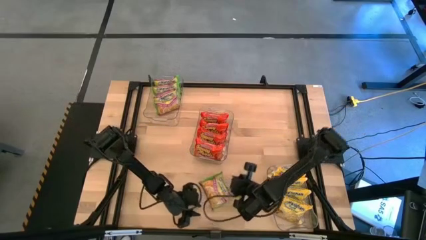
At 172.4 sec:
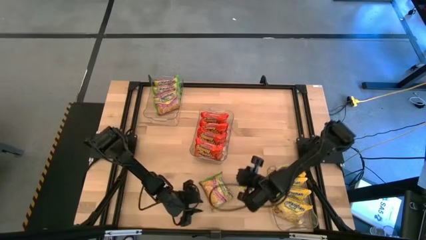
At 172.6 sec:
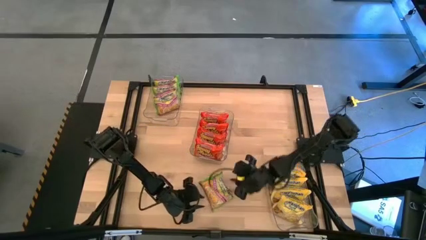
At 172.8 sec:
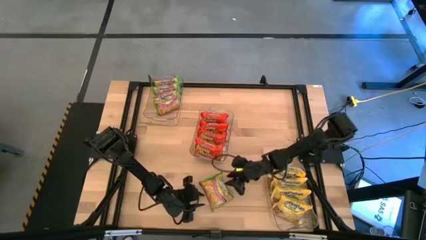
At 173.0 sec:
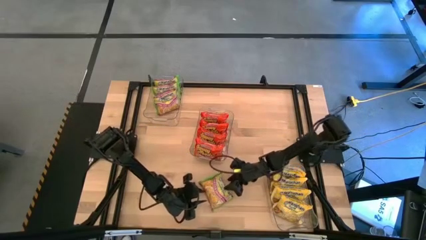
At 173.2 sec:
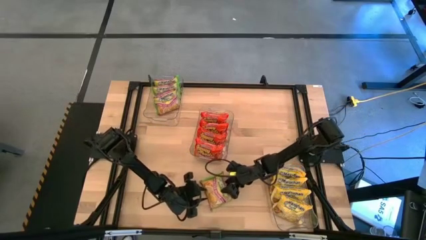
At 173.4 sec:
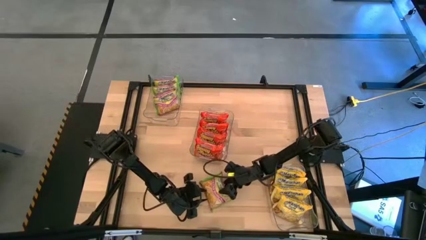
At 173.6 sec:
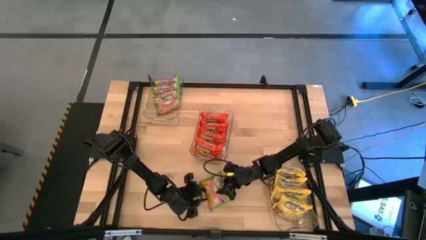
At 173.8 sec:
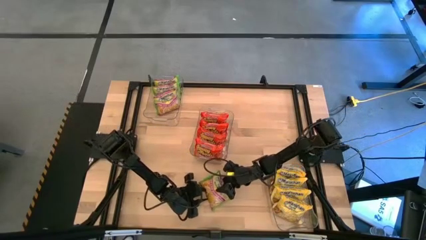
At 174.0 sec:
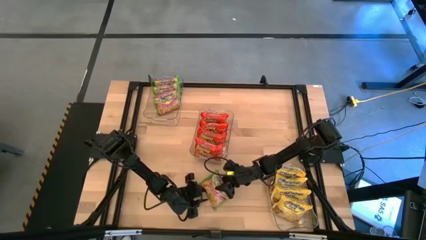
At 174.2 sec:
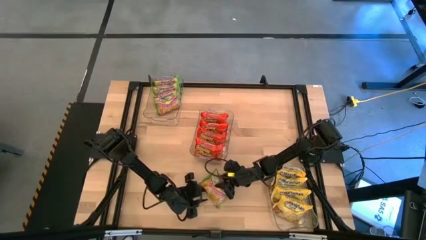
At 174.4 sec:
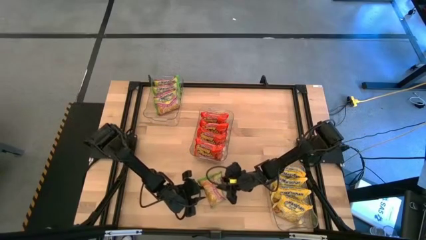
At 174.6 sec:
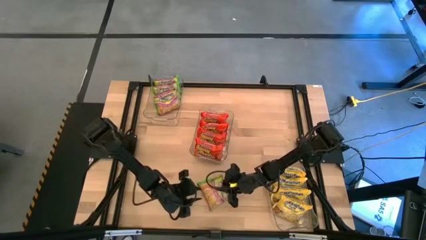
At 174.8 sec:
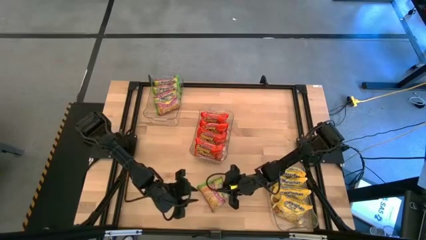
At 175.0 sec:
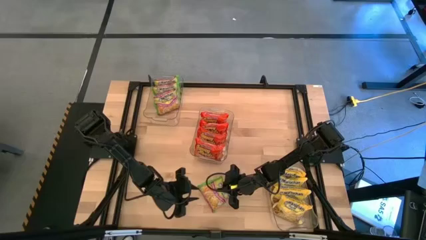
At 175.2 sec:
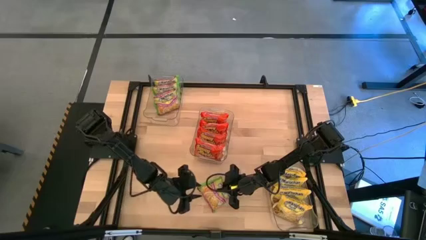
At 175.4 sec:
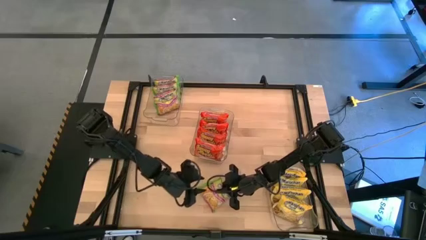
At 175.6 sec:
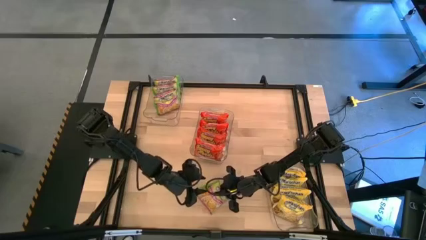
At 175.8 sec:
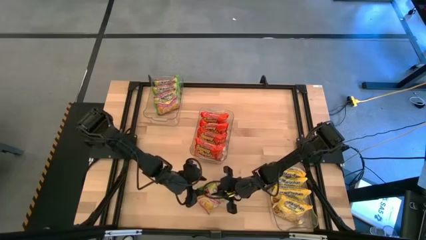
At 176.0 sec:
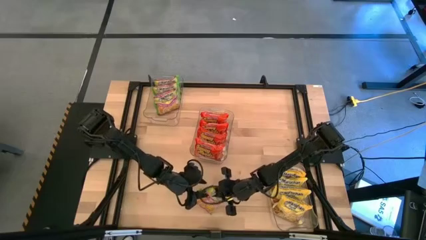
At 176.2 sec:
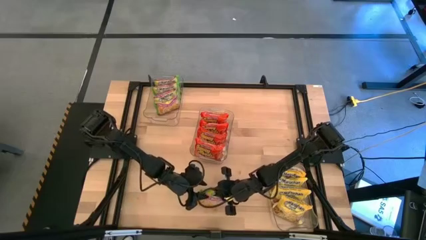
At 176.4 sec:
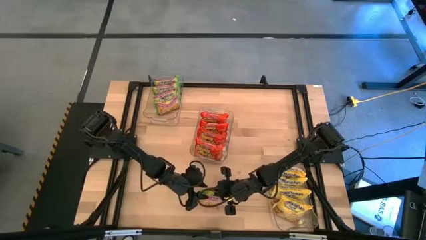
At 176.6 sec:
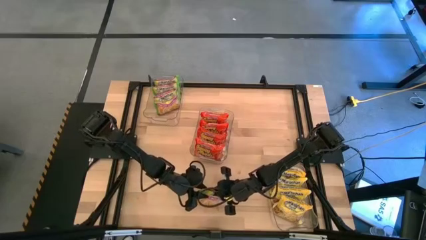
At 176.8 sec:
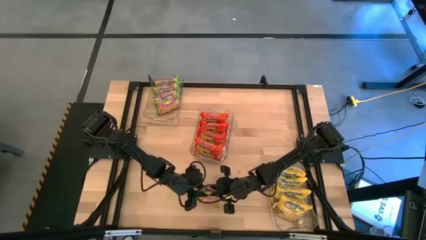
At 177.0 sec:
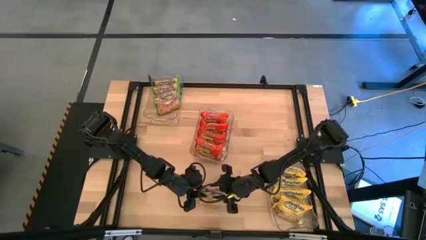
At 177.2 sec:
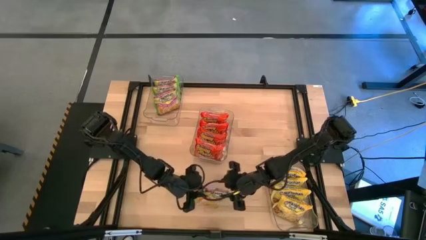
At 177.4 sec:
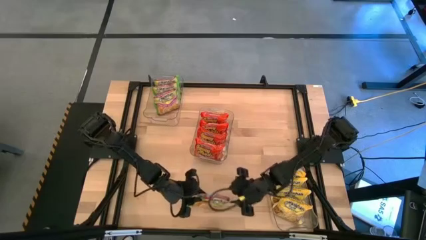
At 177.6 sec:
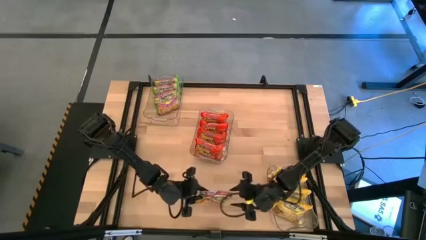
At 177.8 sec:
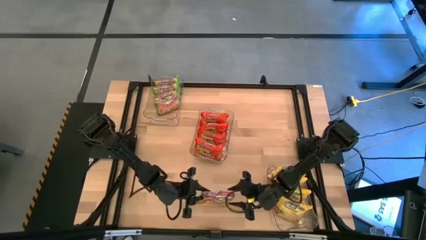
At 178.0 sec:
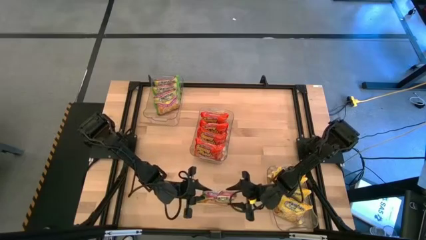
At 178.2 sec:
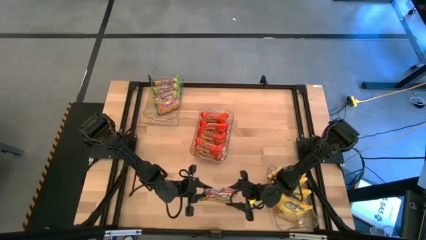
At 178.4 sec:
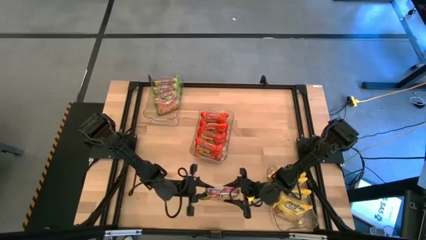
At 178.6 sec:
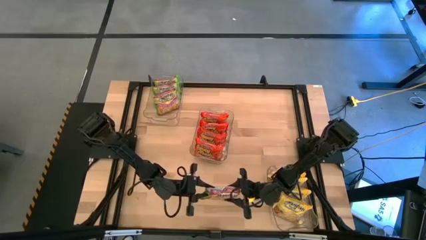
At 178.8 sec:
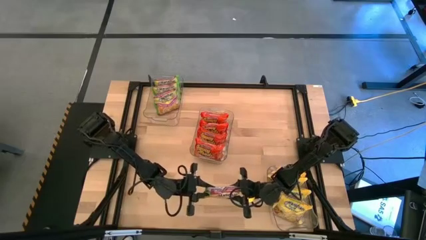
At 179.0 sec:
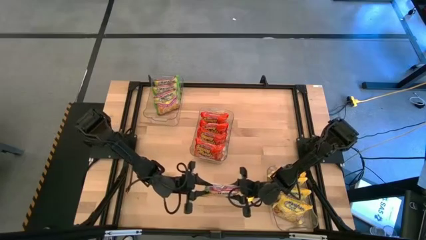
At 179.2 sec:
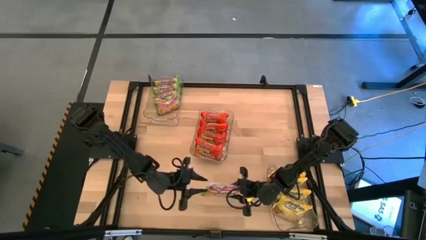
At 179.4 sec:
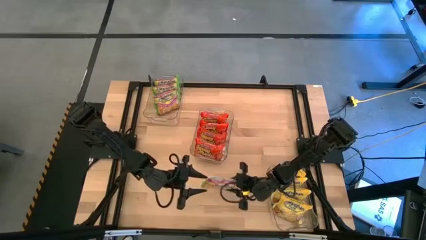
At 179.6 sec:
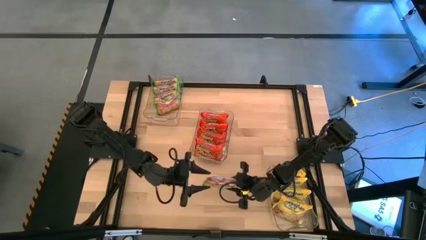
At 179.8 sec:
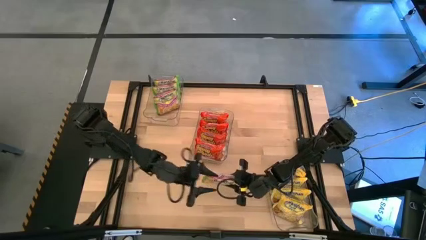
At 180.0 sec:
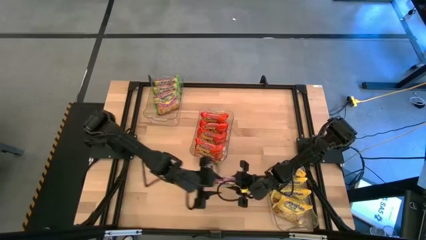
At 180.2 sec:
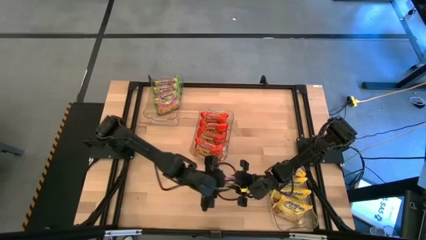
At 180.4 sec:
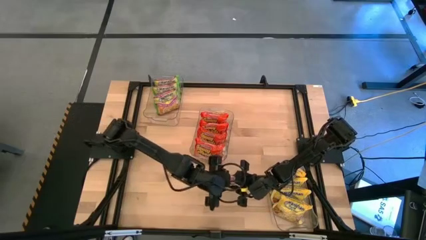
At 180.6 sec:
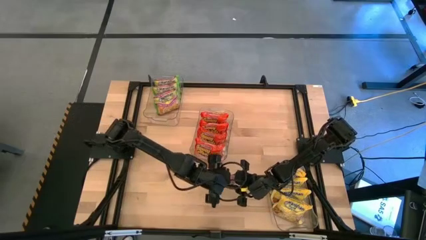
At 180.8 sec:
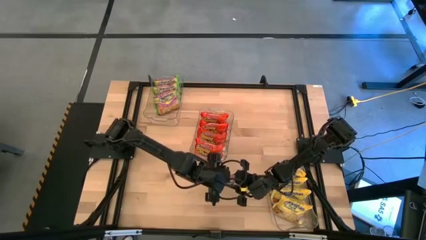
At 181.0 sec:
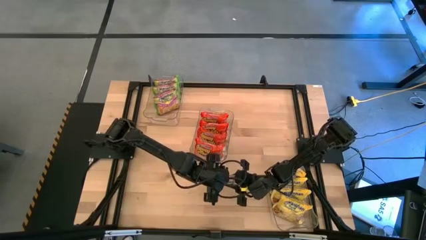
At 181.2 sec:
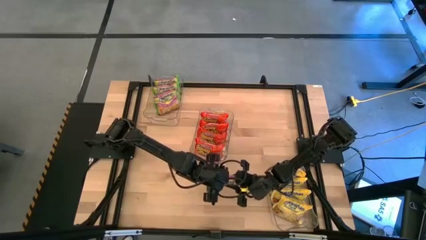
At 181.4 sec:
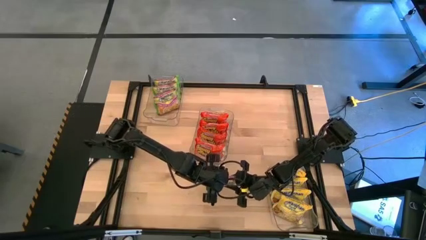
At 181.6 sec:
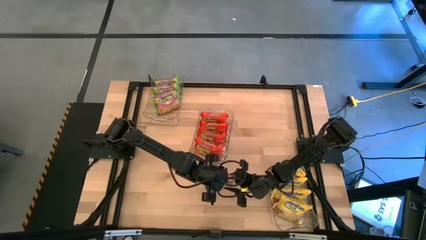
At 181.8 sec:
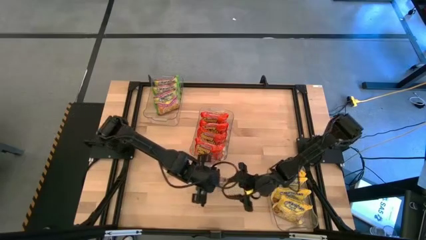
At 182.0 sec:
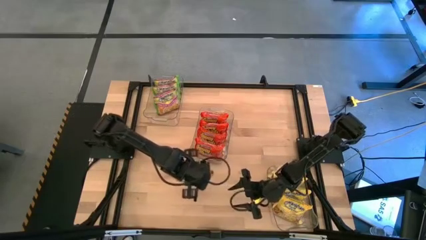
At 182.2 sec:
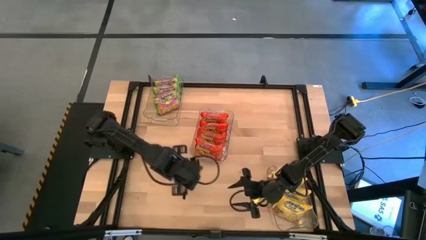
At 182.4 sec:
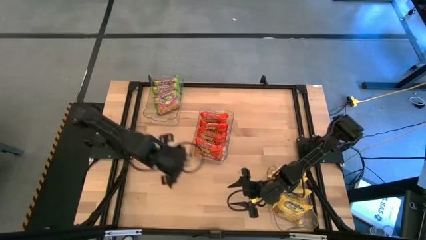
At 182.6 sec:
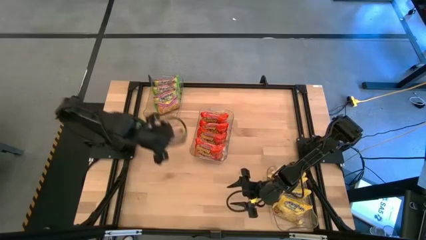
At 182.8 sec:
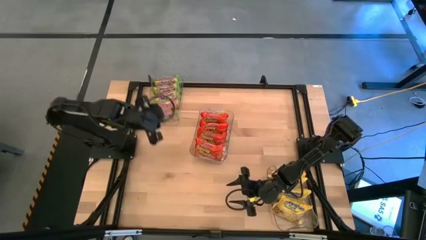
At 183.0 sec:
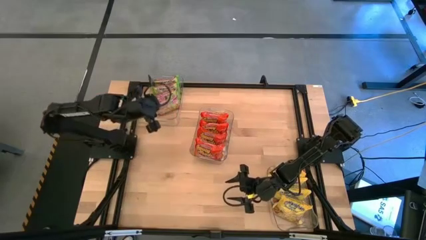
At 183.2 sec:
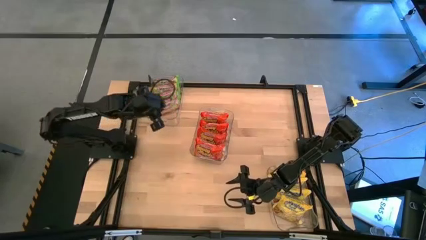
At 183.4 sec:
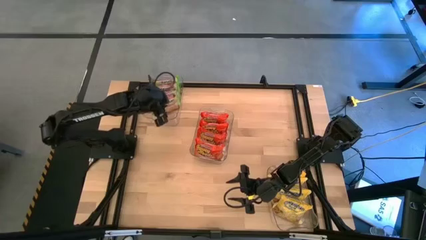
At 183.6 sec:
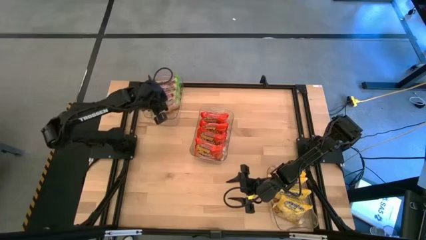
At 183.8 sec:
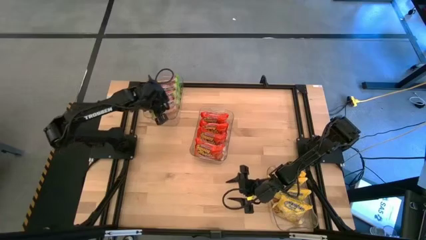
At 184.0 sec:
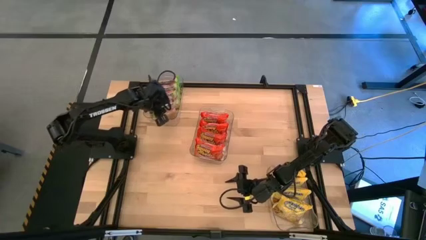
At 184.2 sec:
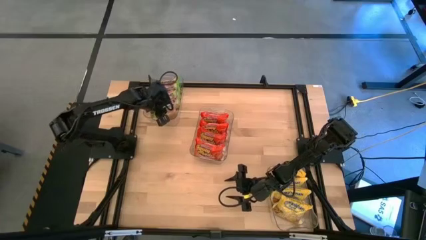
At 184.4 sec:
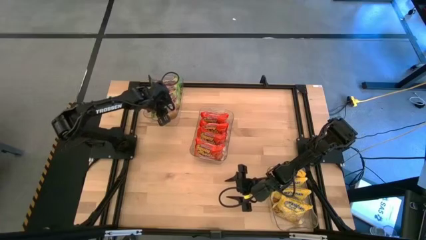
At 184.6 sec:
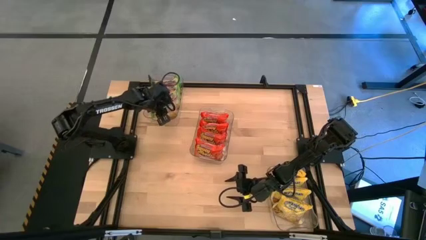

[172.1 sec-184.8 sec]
Task: Sort Maruchan noodles
Put the green noodle pack into the top transparent bin

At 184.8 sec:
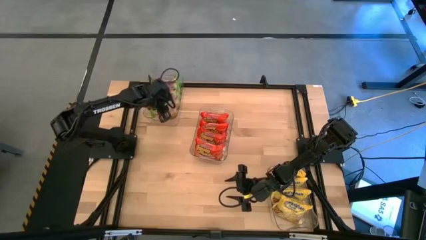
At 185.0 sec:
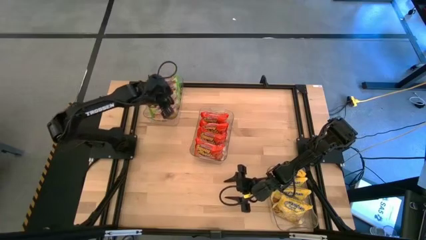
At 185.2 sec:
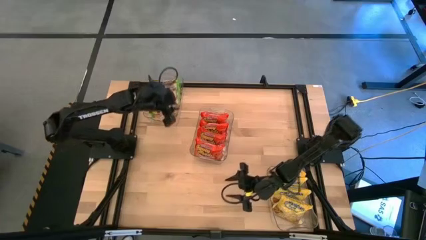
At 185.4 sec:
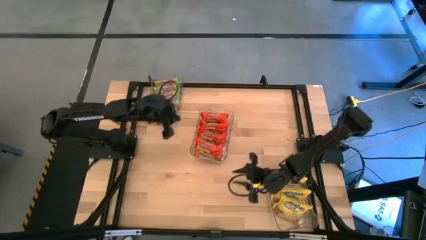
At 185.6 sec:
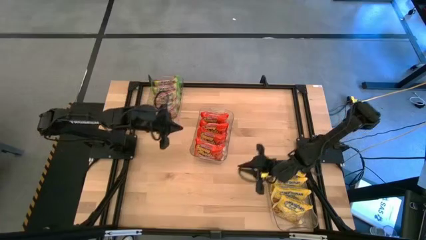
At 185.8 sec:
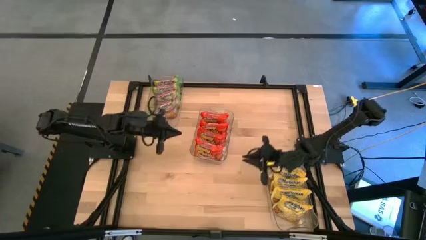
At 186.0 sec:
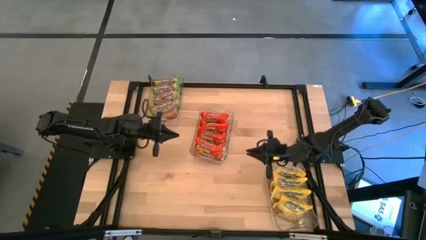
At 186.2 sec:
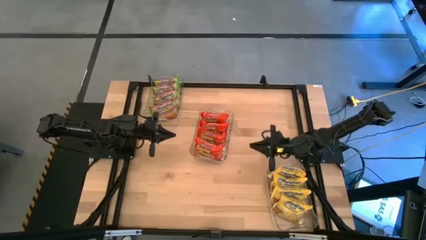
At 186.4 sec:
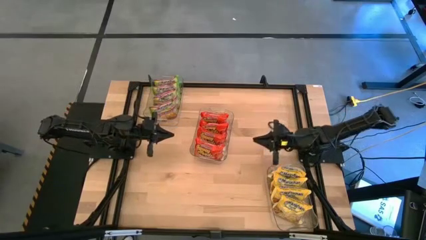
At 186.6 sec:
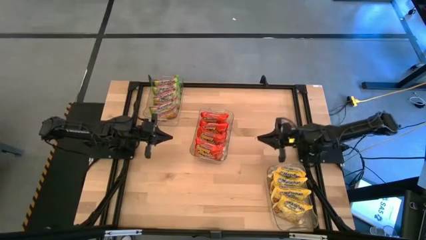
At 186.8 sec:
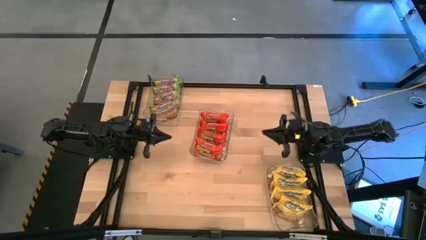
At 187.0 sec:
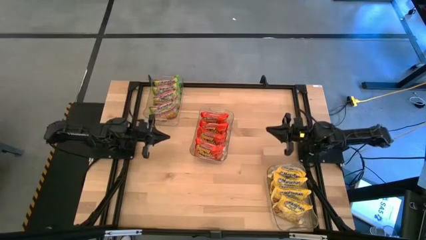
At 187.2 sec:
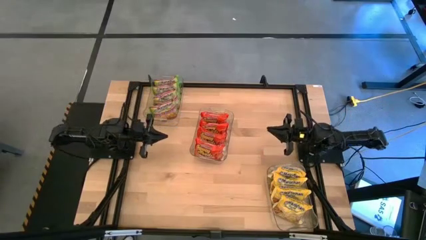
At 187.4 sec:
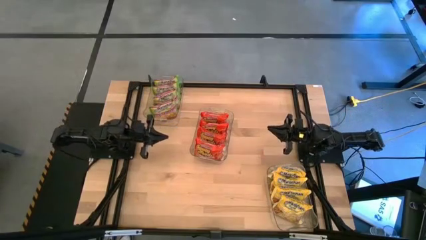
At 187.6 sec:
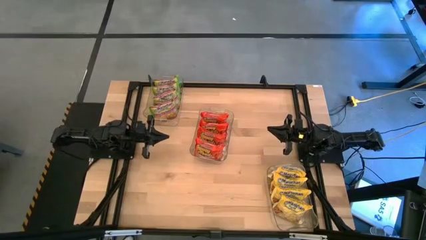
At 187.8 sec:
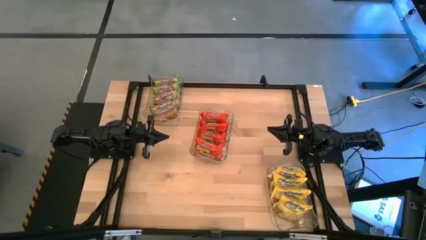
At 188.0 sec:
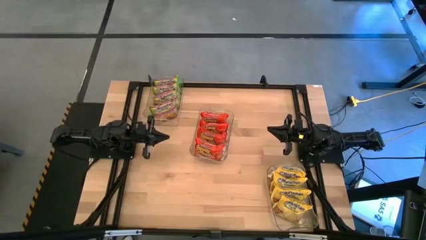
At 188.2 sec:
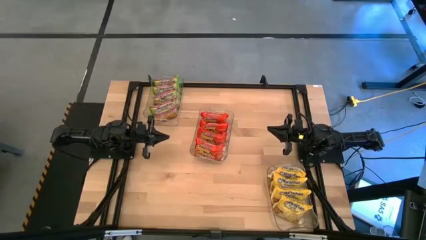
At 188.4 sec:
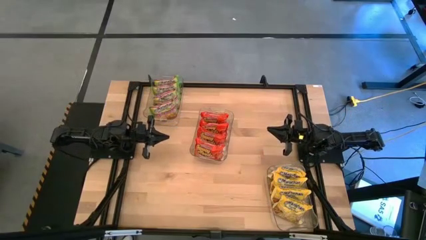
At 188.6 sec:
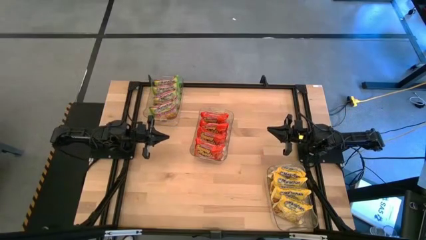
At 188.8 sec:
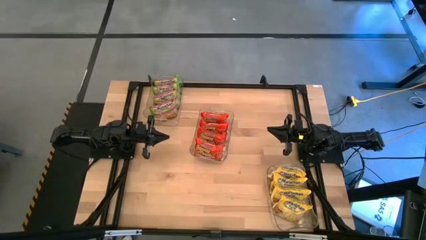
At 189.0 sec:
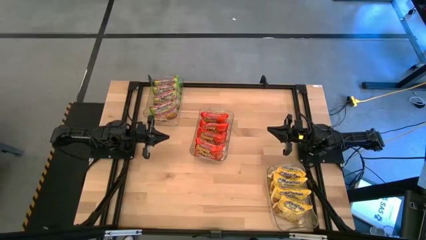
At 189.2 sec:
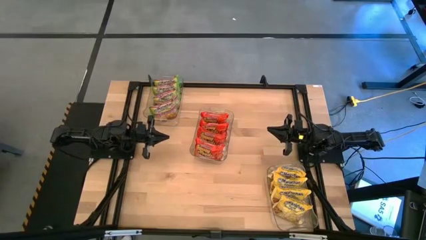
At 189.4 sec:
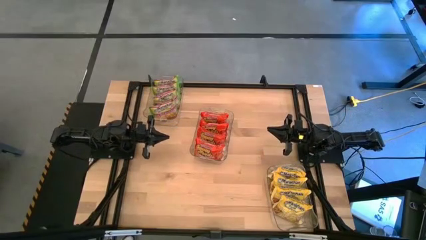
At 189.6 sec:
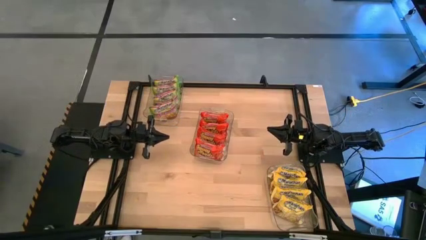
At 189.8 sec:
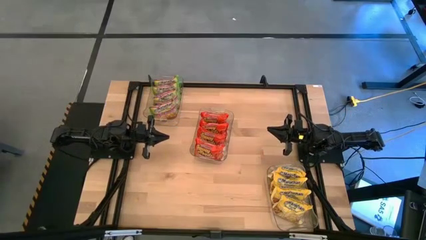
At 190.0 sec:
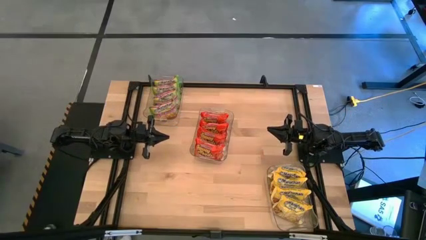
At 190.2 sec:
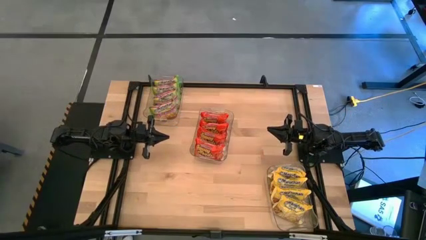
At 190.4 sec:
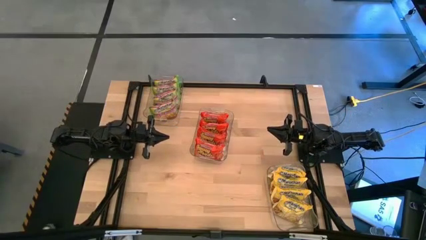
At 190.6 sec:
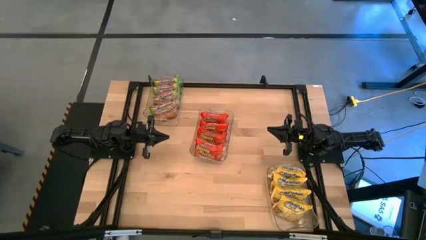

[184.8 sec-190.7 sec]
Return to home position
